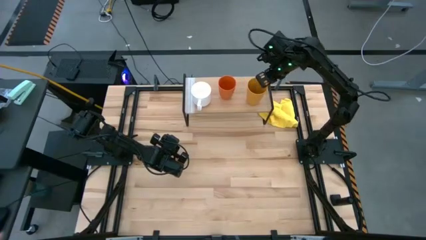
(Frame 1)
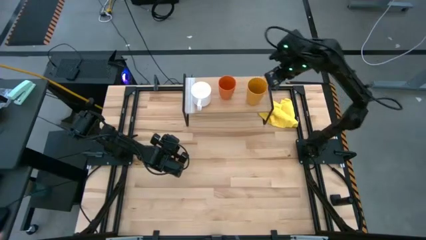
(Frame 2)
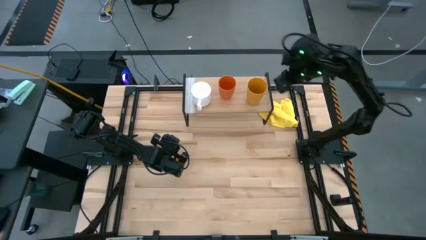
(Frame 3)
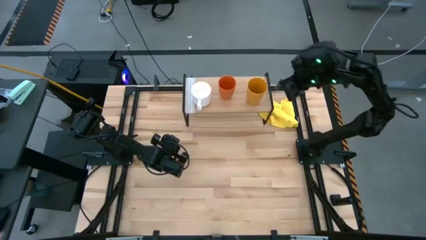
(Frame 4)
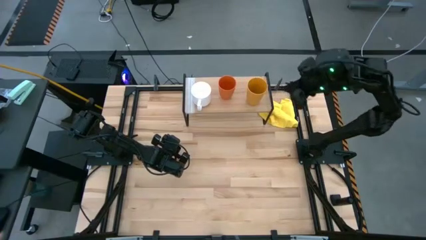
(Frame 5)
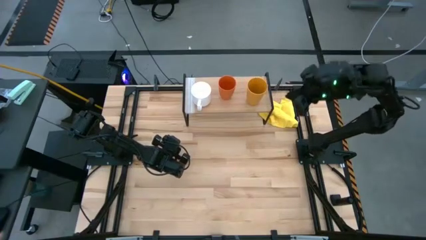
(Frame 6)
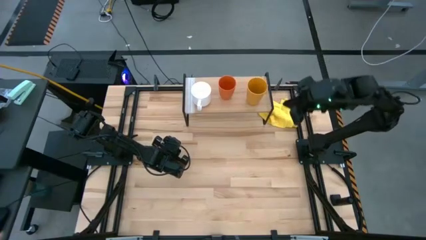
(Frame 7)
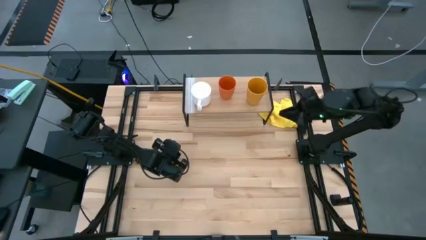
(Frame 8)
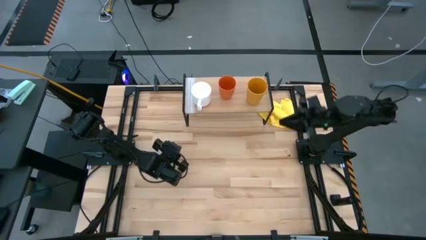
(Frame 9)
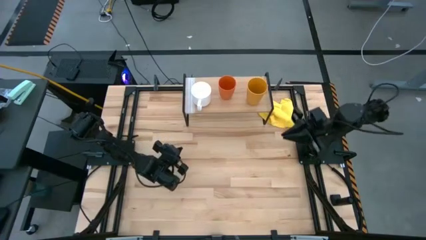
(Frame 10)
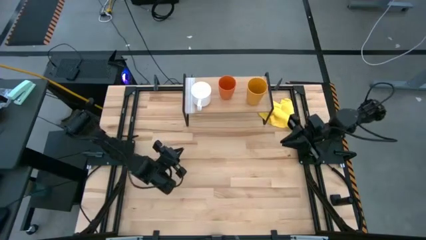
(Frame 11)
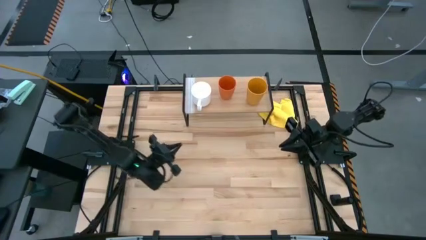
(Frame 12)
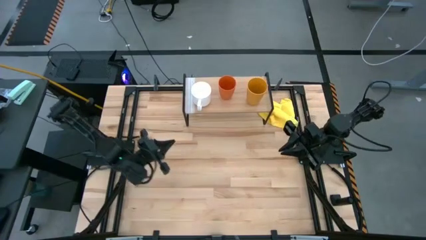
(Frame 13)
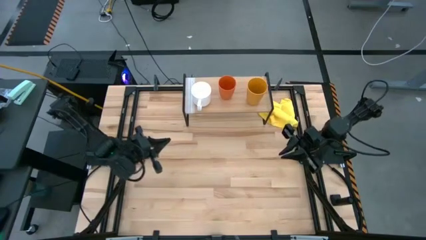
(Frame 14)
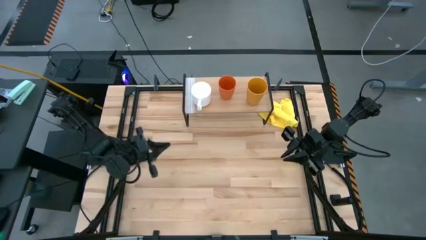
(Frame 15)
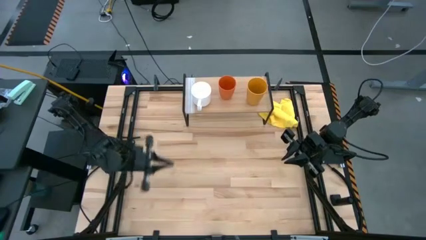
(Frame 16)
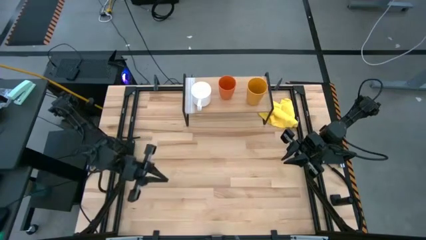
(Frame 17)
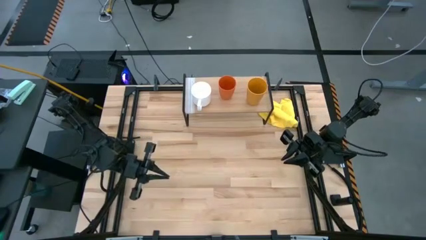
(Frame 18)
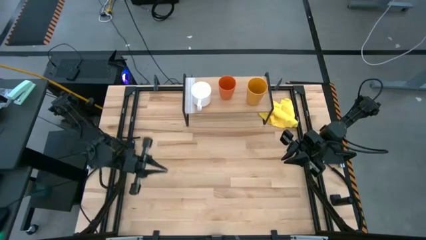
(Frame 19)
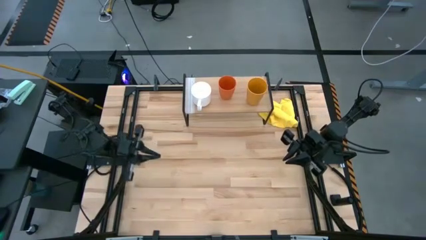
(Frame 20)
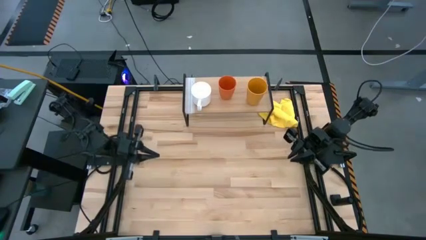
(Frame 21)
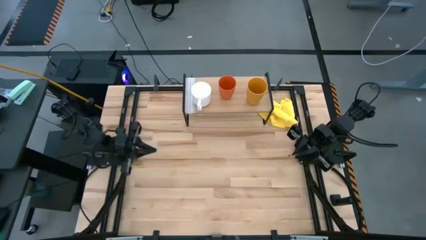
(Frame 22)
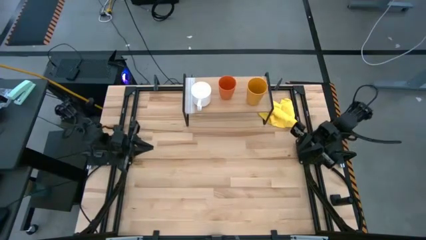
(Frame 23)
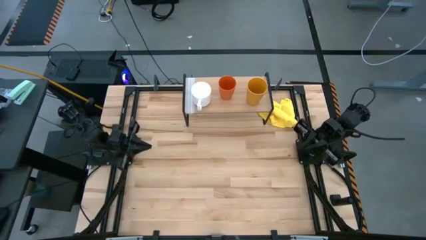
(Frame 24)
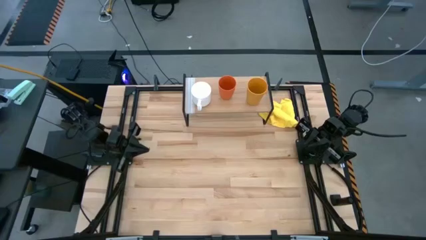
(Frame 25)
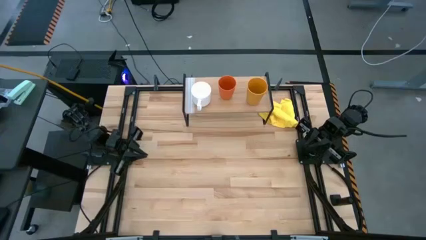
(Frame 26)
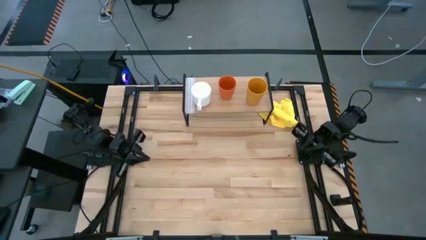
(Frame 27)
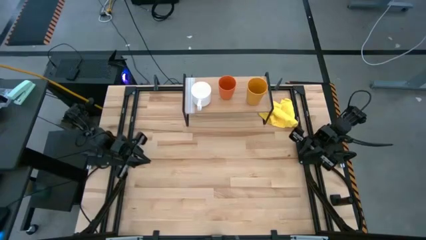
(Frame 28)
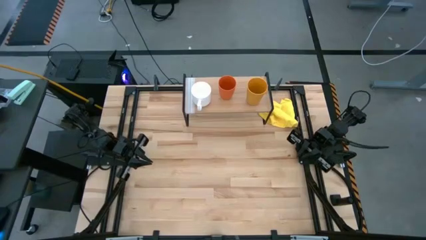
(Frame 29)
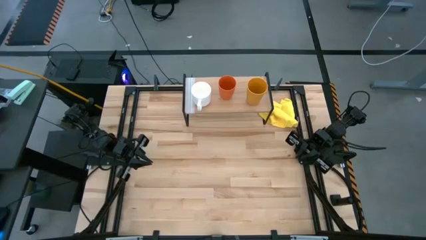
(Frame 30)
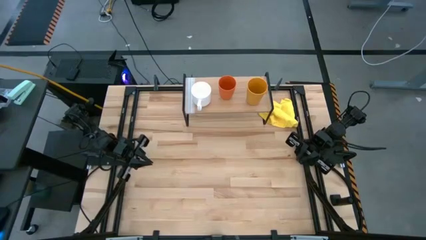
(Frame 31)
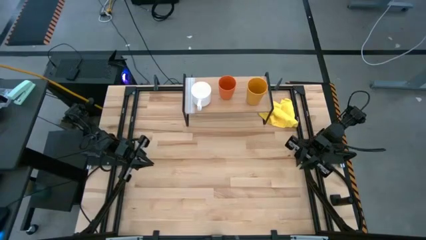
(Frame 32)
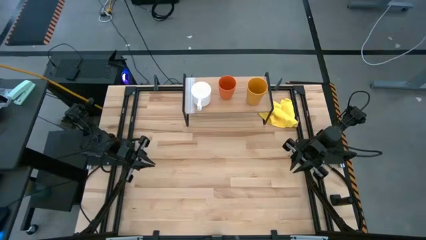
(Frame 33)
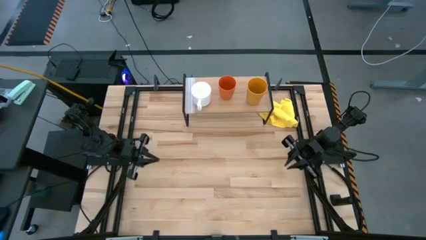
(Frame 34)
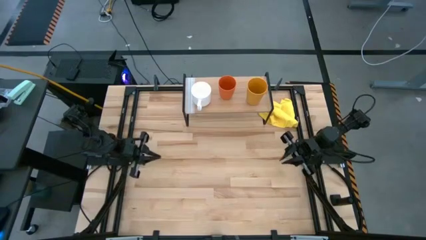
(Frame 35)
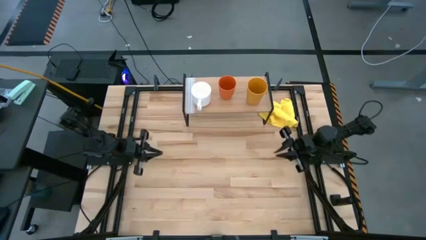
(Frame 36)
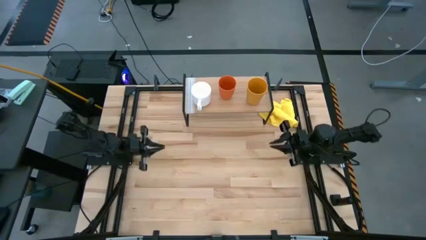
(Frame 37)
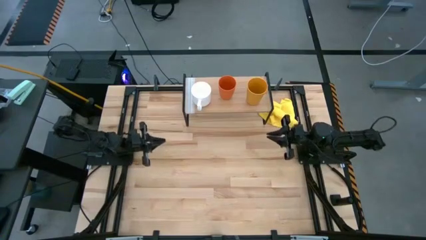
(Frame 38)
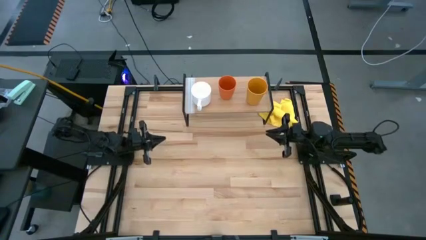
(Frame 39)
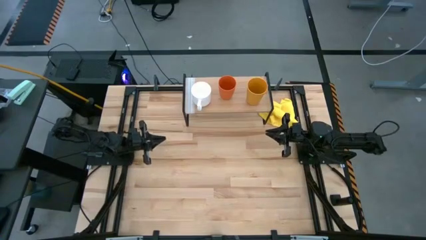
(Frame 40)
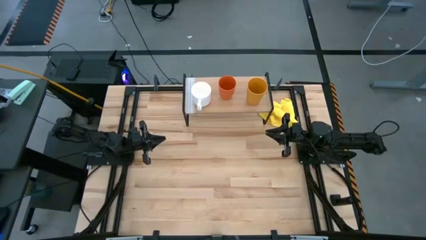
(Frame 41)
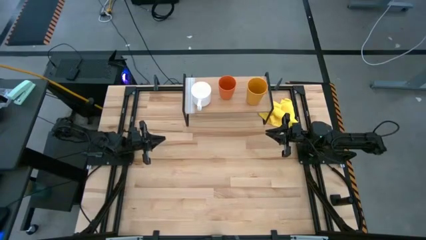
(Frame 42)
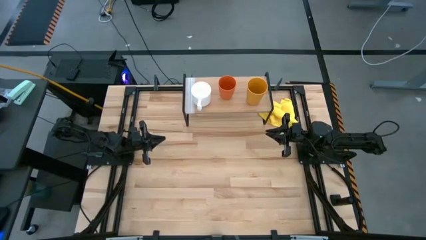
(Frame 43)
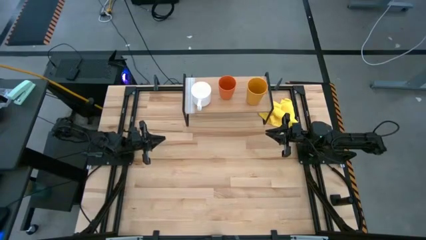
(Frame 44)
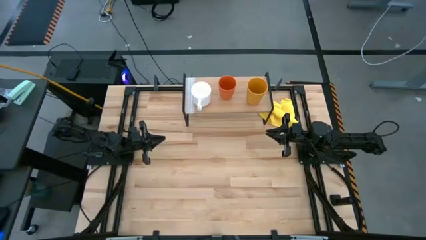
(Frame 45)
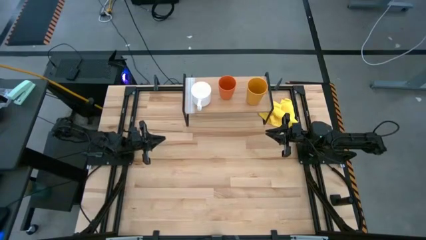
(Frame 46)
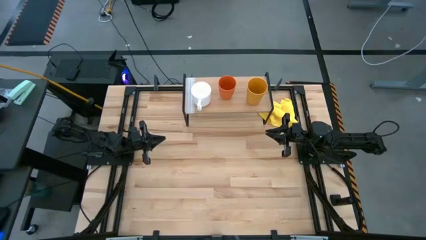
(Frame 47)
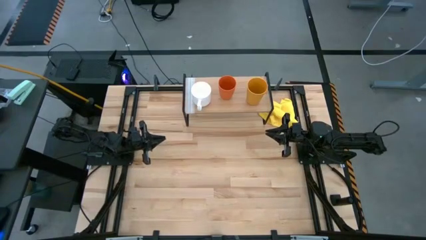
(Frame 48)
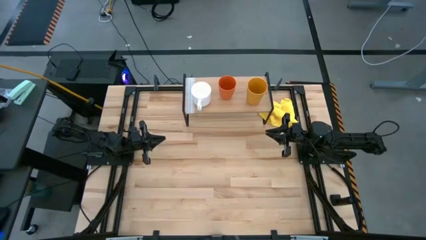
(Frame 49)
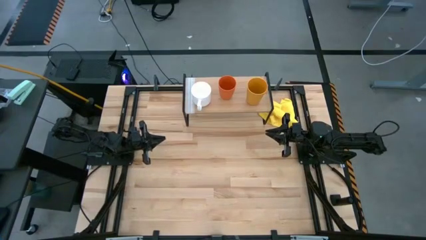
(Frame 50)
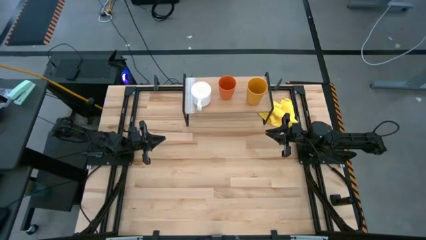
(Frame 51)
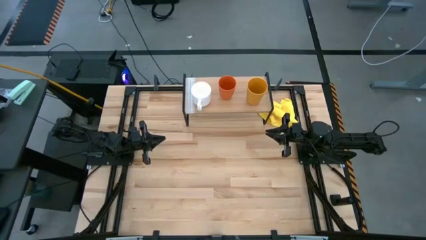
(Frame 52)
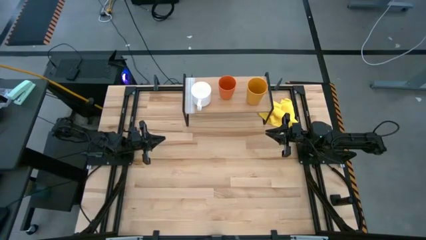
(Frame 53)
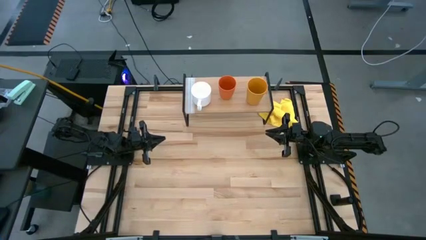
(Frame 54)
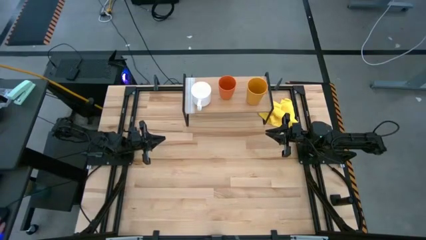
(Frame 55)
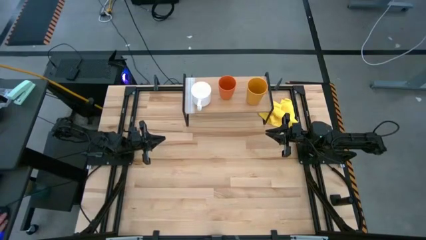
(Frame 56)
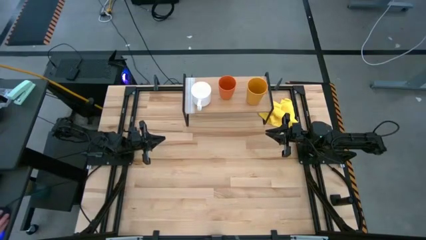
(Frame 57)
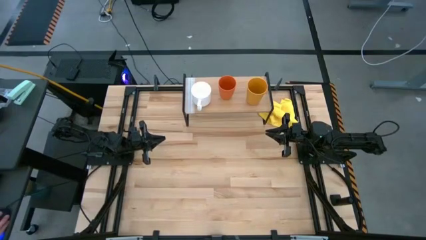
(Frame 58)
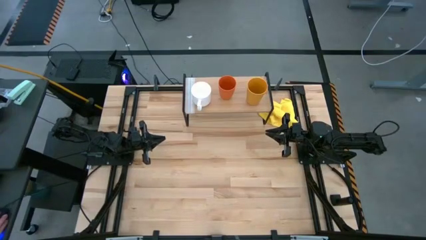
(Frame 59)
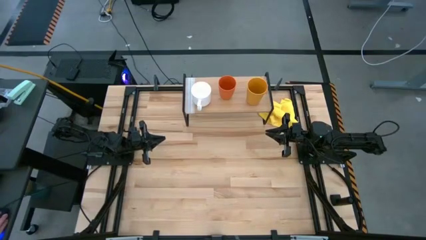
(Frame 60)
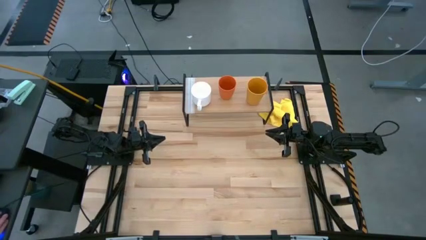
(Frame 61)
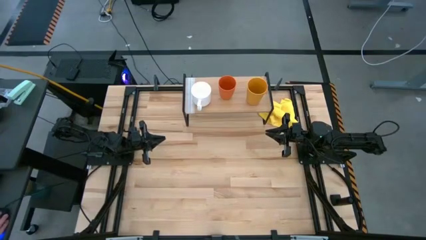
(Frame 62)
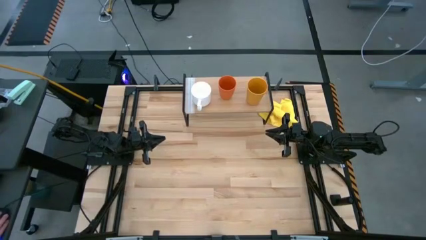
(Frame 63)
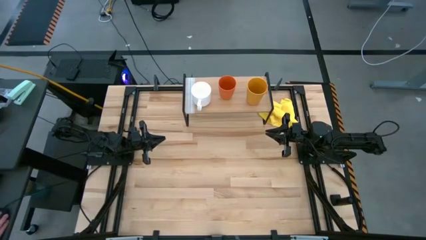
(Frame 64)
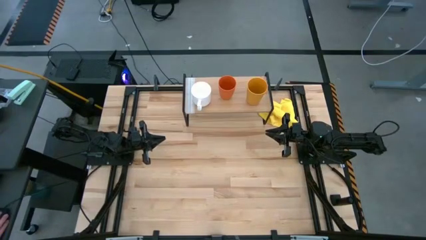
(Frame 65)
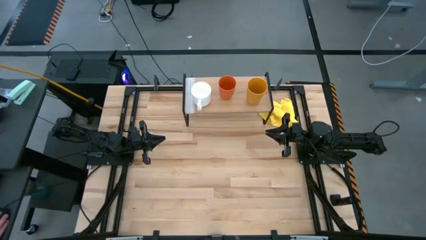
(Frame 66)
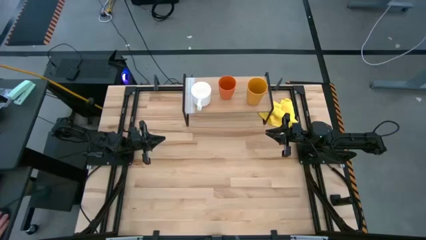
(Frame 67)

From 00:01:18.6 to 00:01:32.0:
Task: Stack small to large cups/mugs on shelf
Return to Home Position

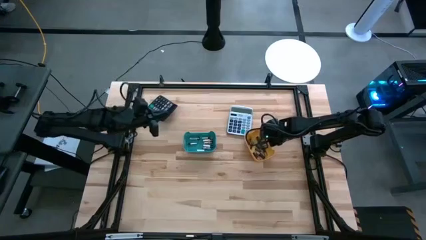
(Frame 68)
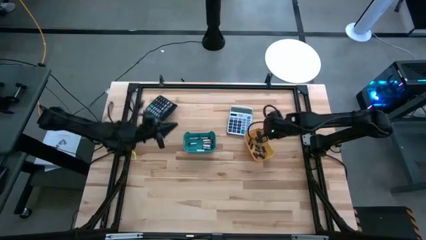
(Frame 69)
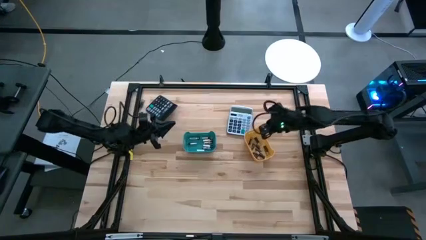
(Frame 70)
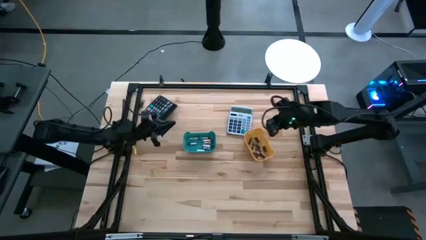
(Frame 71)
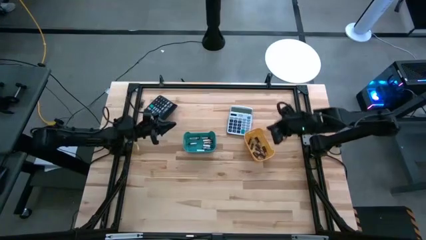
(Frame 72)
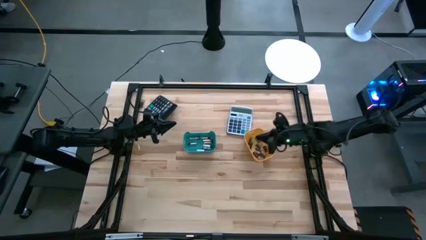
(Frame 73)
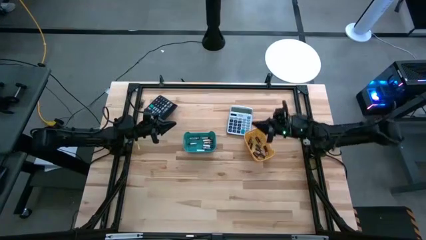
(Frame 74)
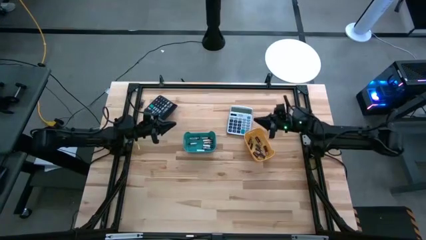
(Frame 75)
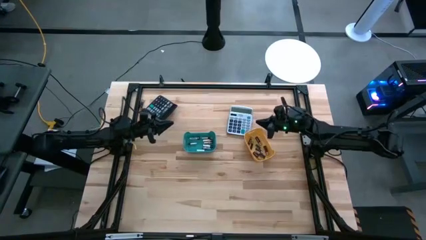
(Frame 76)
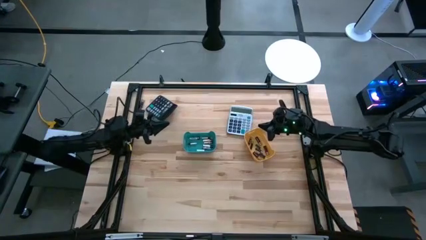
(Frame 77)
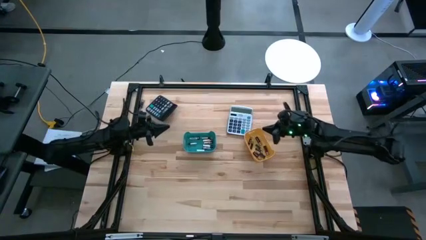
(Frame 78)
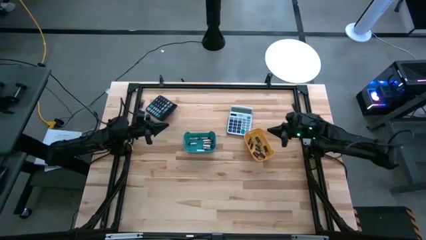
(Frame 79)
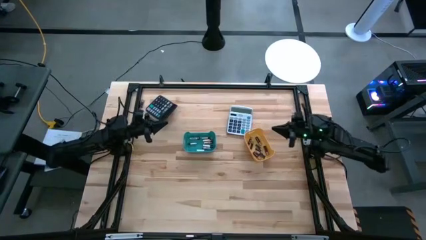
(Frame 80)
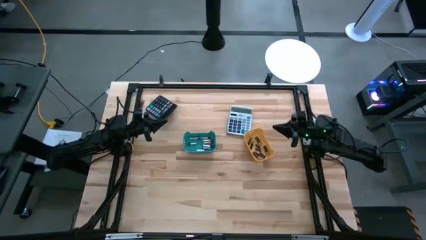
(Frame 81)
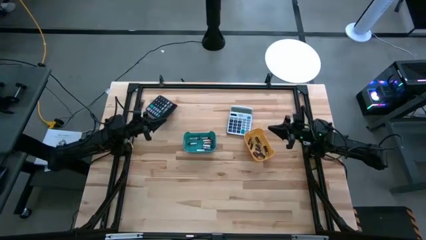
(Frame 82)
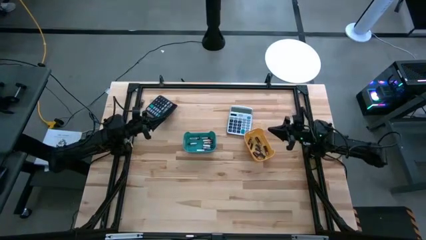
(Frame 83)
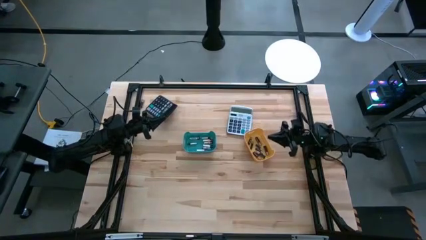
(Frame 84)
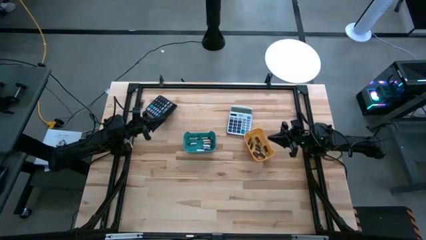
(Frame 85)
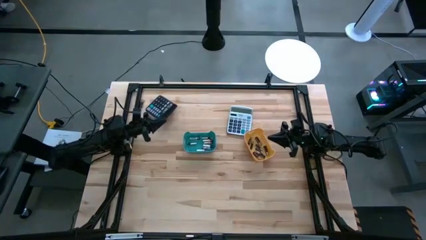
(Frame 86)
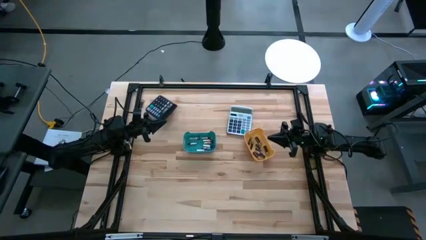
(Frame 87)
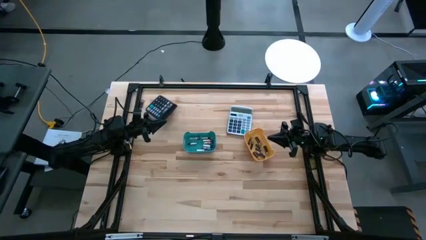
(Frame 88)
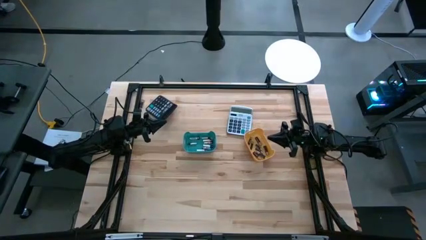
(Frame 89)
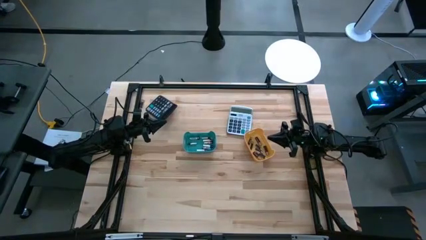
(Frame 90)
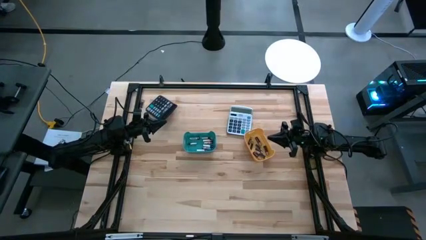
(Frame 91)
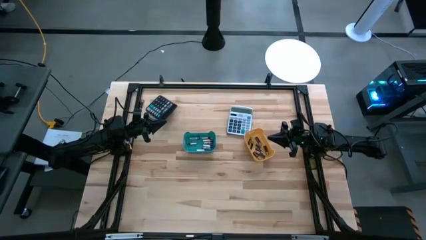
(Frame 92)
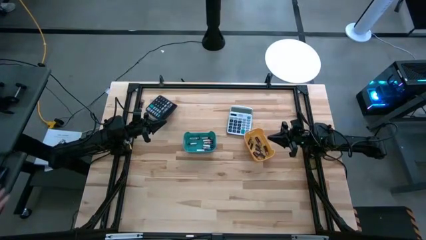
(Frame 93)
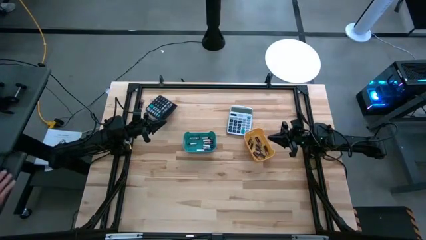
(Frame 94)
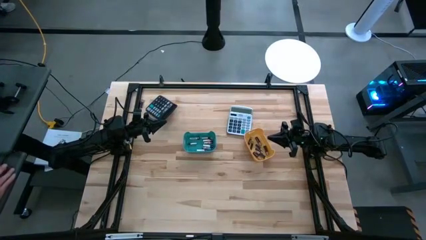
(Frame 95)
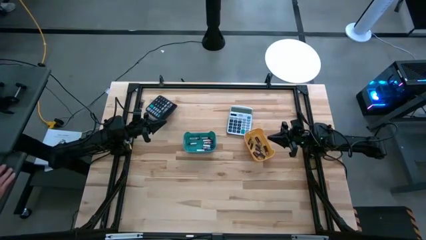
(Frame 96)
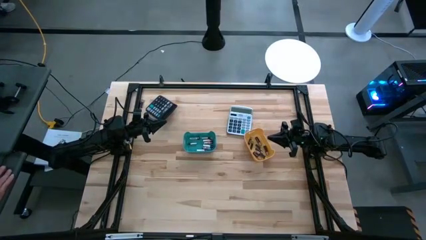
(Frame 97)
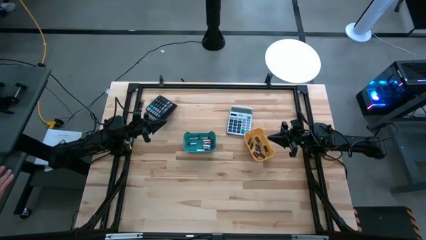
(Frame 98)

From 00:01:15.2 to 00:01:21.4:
Task: Sort batteries
Return to Home Position
